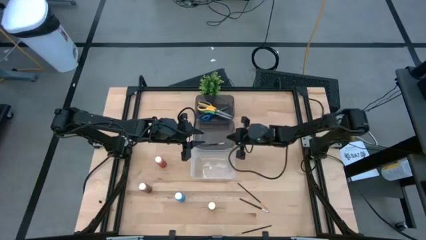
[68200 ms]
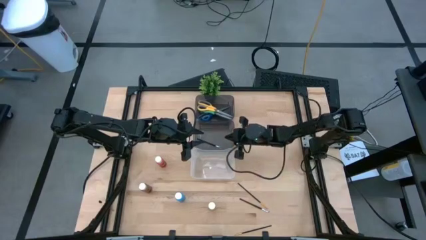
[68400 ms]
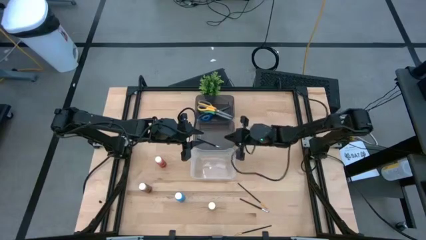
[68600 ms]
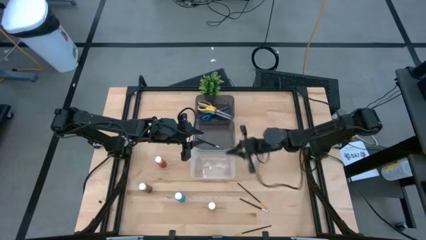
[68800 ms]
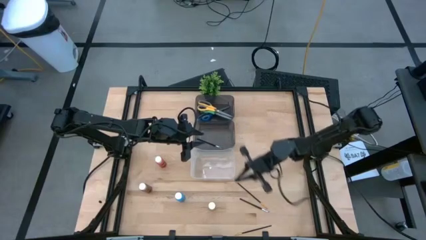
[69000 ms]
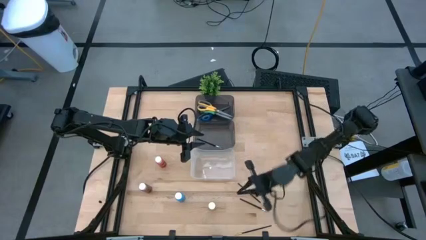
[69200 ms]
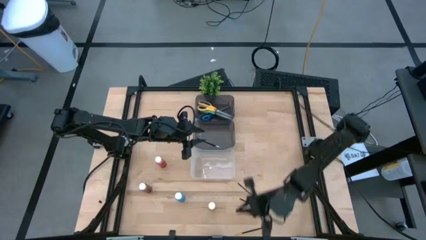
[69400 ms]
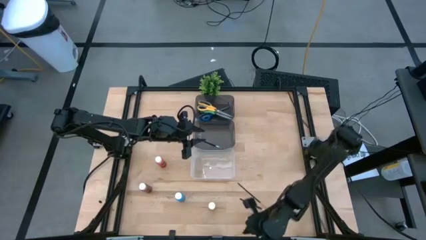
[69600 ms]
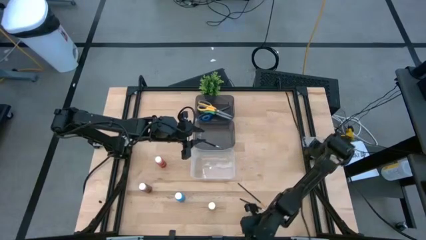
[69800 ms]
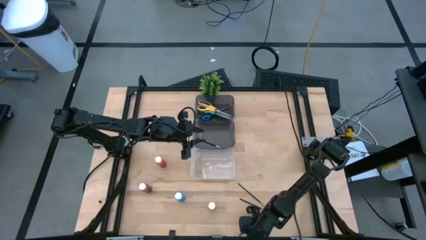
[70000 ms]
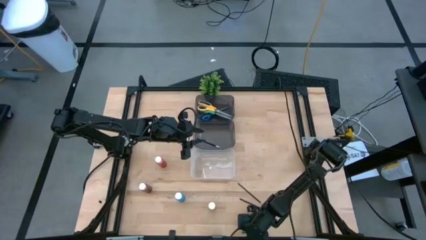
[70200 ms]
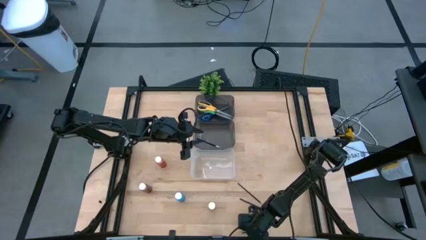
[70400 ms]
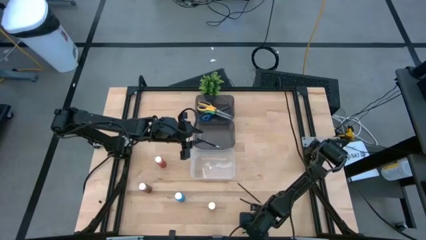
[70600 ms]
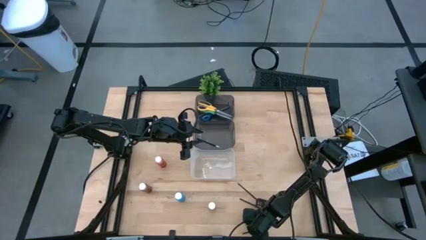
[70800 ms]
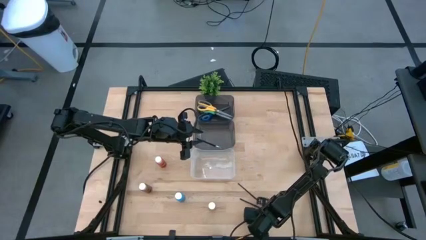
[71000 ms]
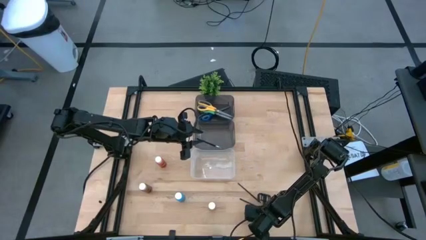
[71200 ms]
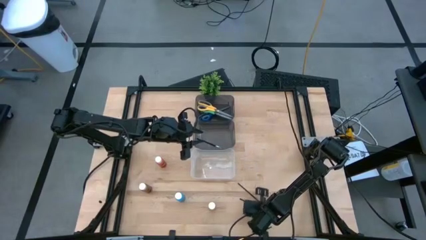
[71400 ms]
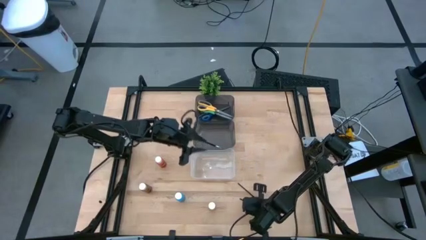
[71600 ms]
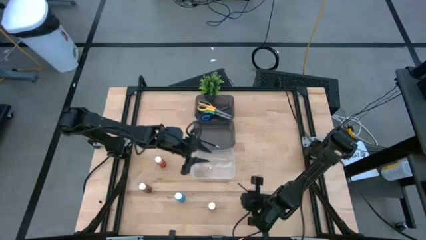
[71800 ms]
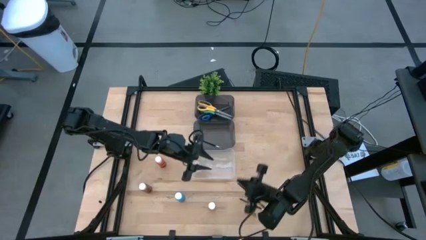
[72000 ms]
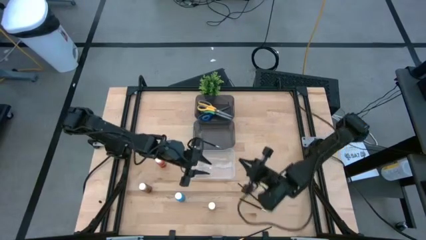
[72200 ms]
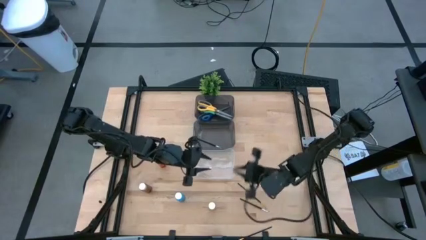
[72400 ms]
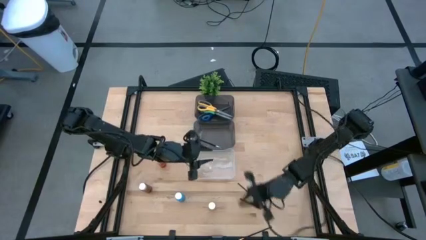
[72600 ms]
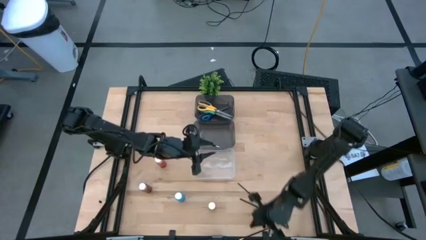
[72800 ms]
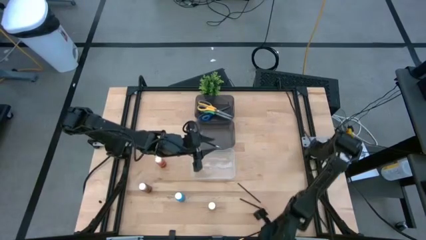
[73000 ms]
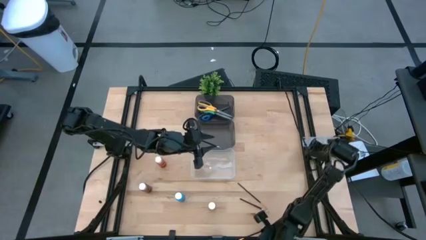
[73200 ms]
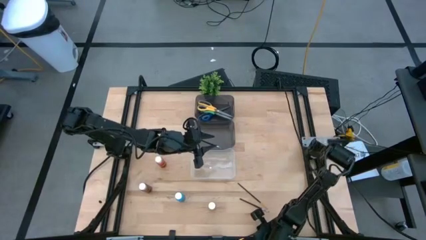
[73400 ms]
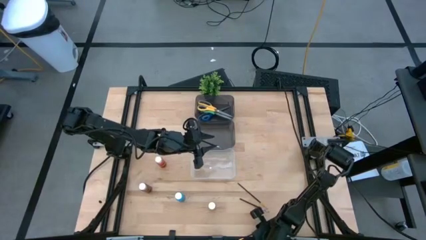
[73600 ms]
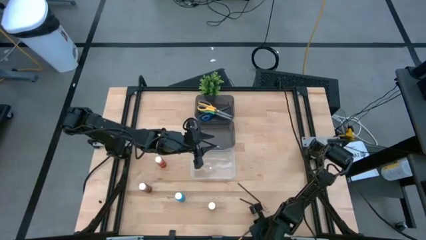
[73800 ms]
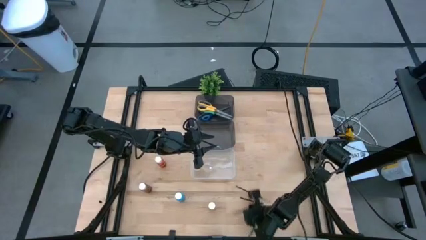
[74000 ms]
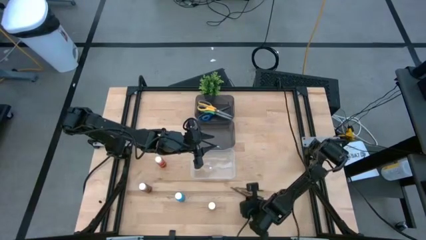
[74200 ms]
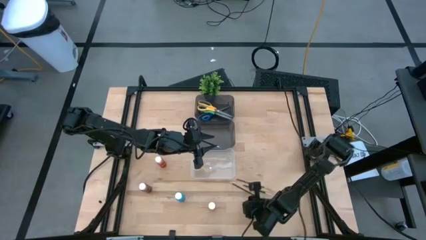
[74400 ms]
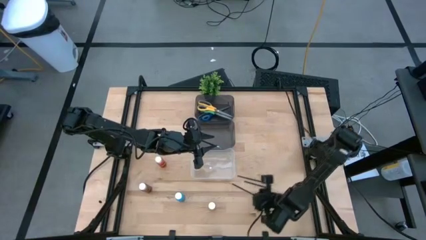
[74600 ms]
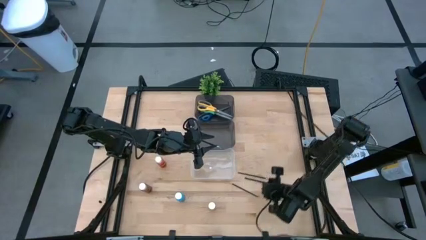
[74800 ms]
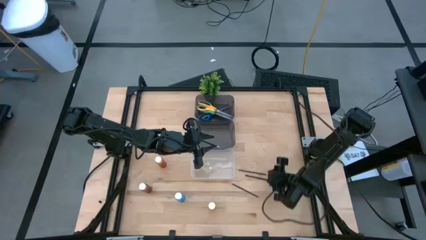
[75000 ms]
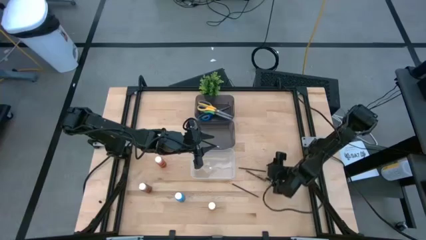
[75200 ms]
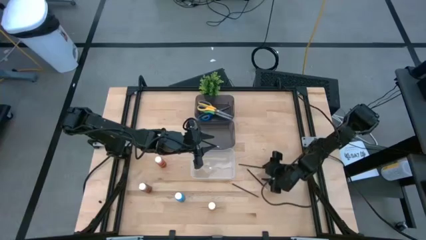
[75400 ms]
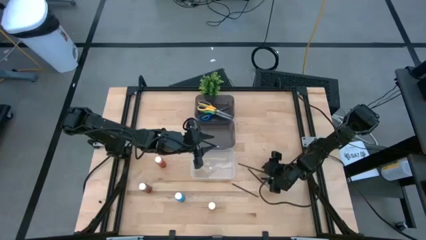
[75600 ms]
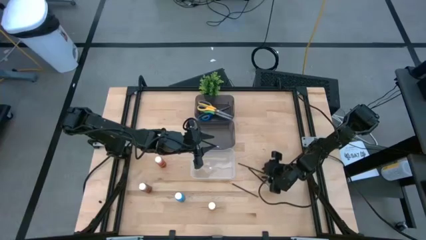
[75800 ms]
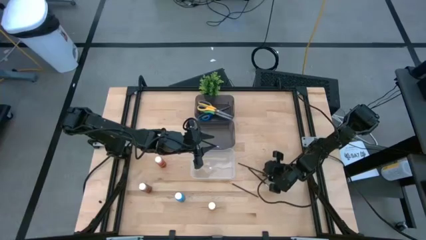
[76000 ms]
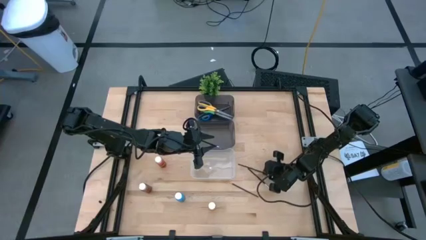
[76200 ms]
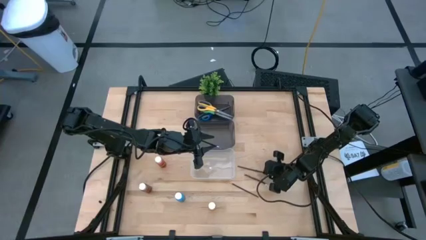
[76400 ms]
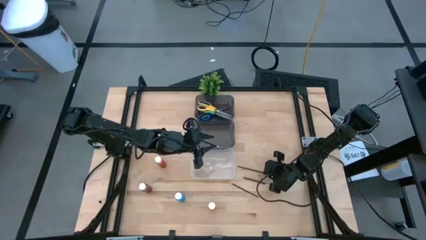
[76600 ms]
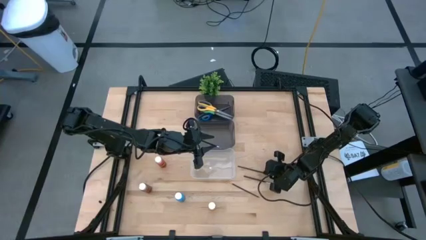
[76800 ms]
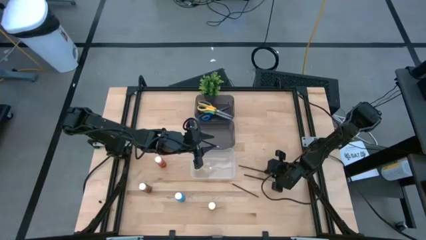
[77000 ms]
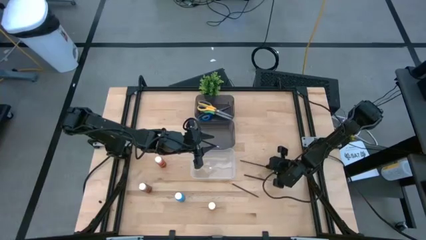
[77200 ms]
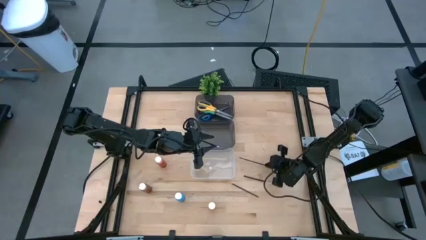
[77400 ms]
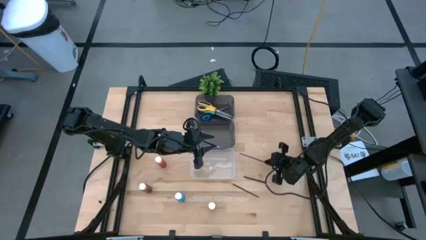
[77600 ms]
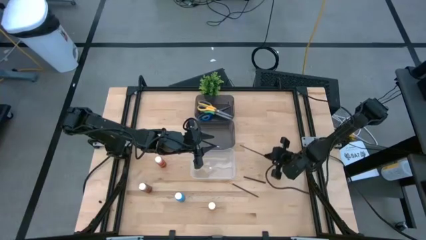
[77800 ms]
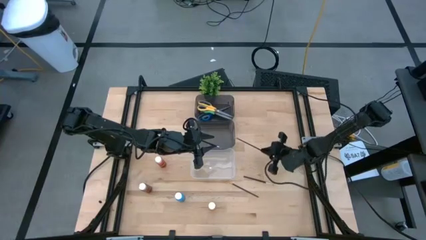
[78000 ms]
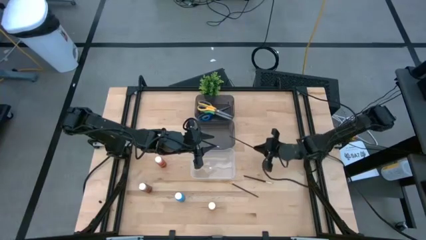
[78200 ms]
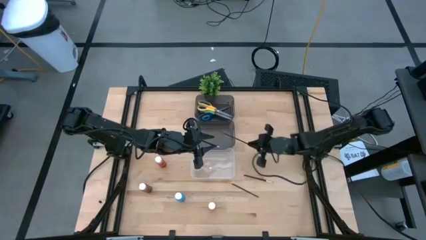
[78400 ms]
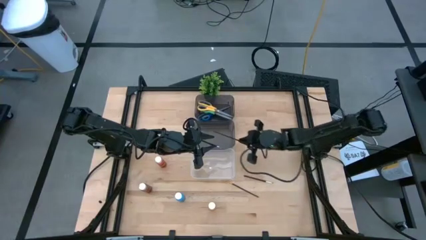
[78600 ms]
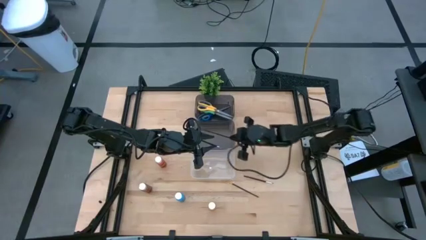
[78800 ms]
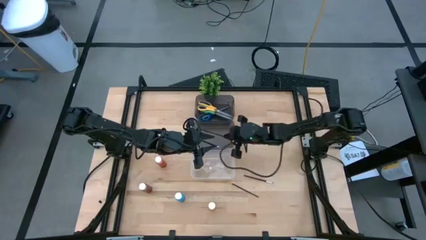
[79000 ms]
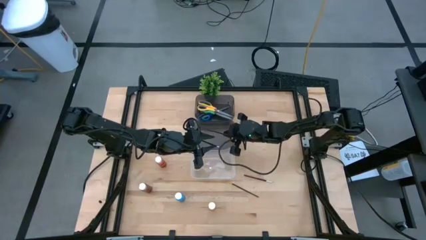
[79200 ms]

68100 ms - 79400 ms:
Task: Pick & Place Paint Supplies
Put the gold paintbrush into the bottom black bin

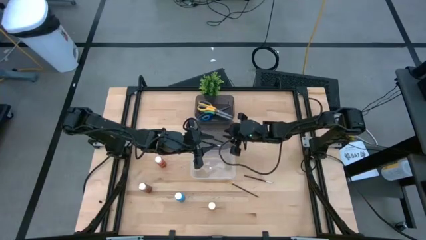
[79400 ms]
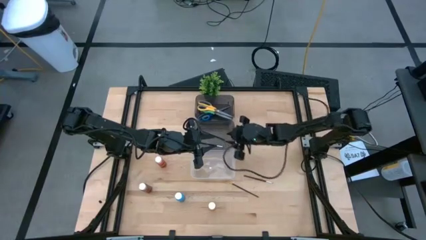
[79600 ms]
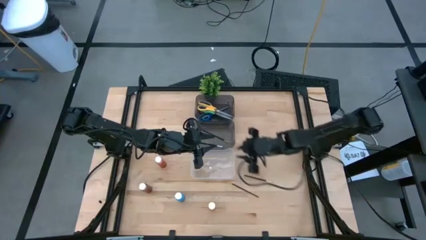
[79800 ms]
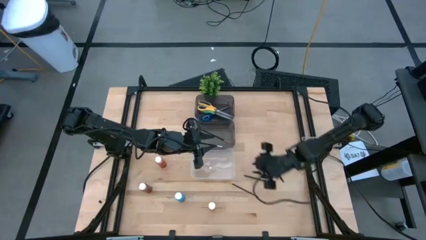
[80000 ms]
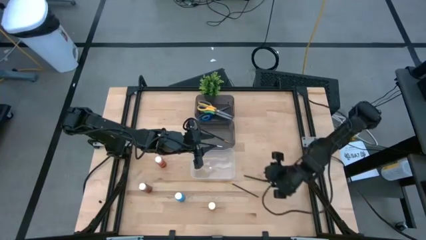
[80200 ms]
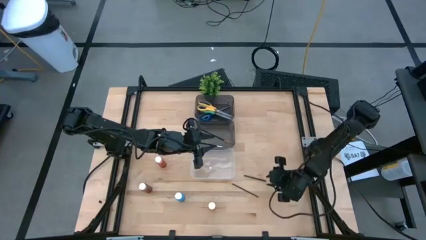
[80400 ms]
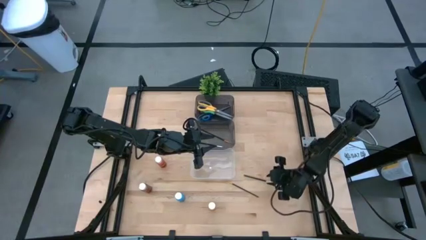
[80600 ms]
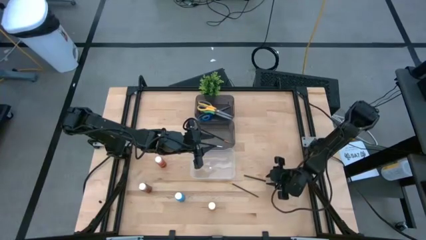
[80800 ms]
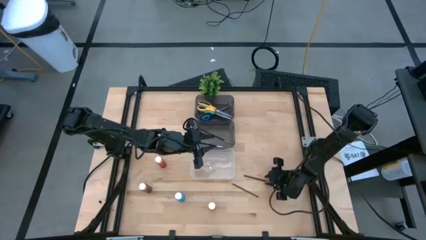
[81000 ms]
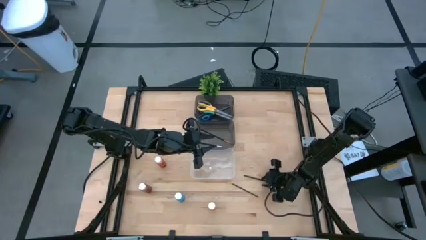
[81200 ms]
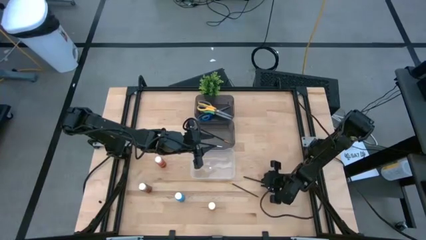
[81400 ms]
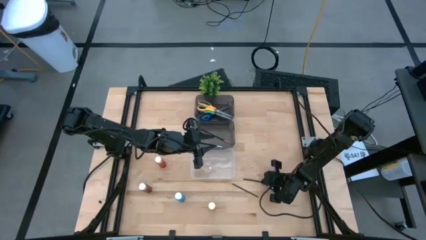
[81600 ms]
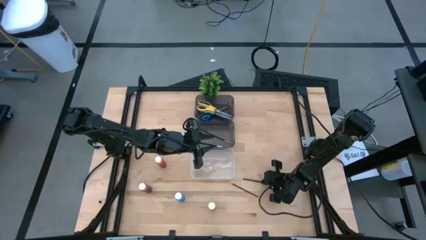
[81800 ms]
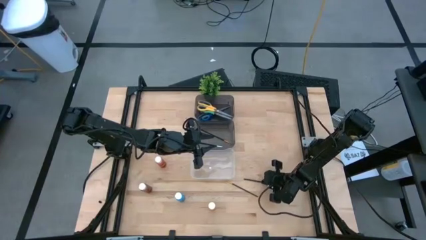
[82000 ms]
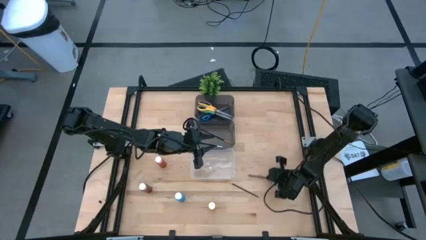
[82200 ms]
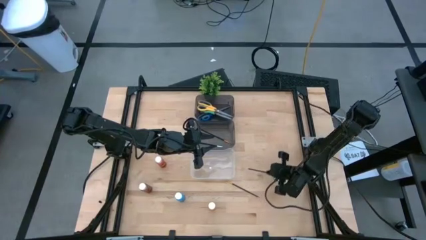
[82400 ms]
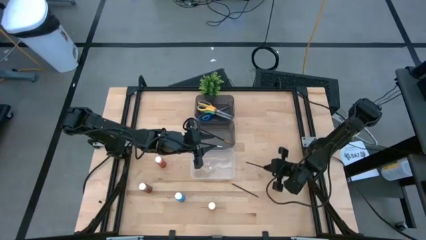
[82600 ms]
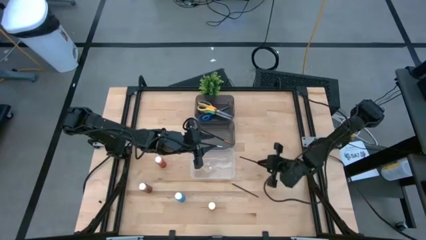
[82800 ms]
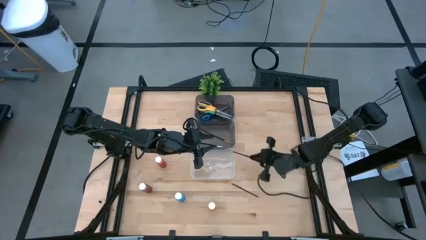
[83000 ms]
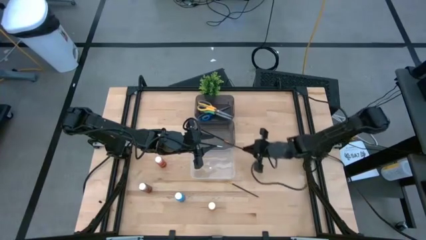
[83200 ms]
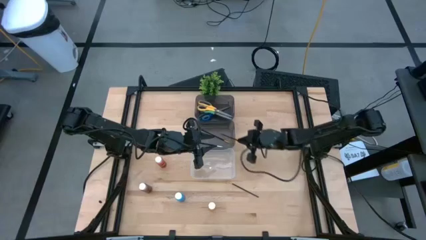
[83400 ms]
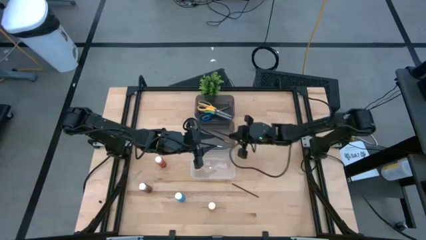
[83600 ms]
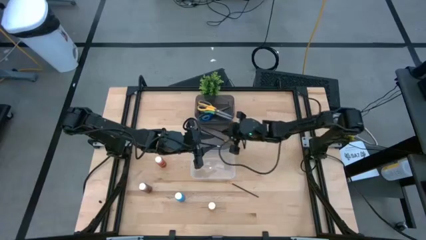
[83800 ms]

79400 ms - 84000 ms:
Put the silver paintbrush into the bottom black bin
